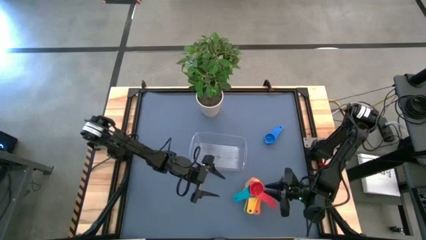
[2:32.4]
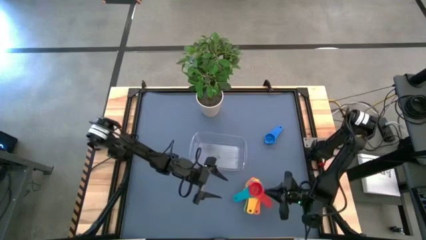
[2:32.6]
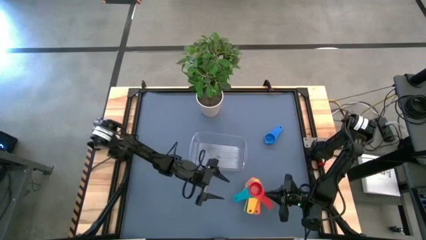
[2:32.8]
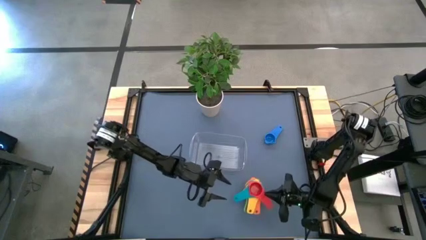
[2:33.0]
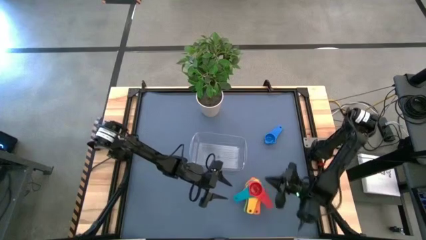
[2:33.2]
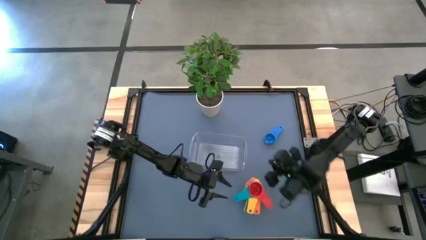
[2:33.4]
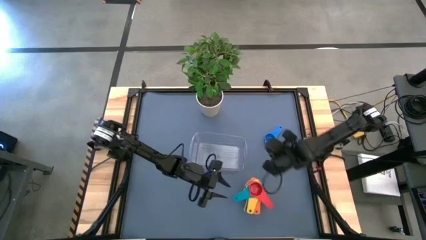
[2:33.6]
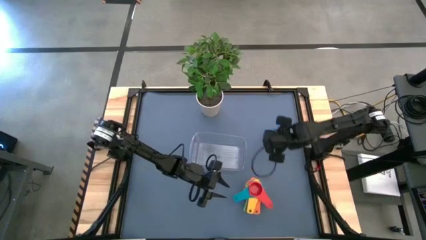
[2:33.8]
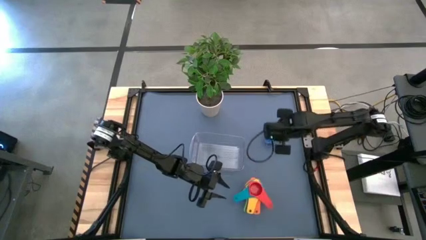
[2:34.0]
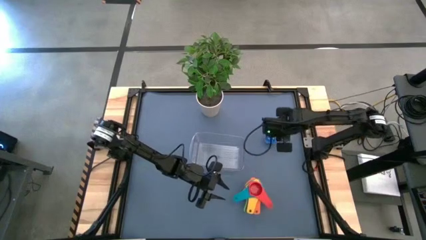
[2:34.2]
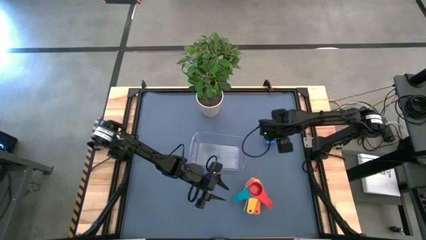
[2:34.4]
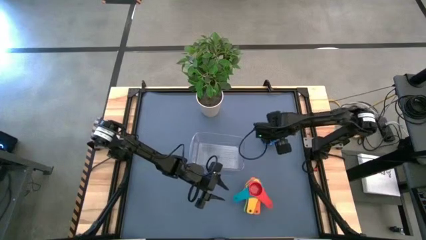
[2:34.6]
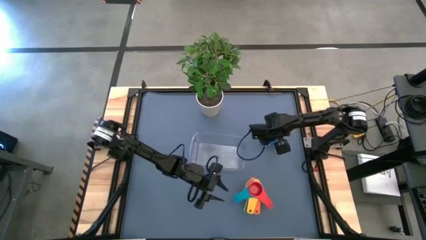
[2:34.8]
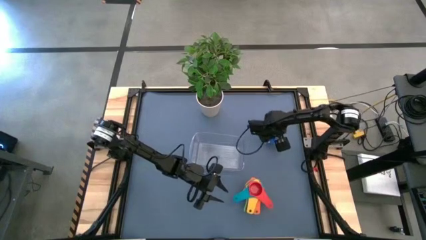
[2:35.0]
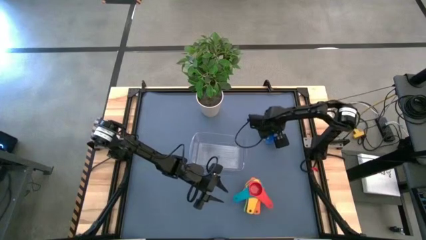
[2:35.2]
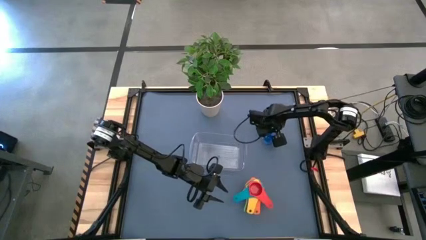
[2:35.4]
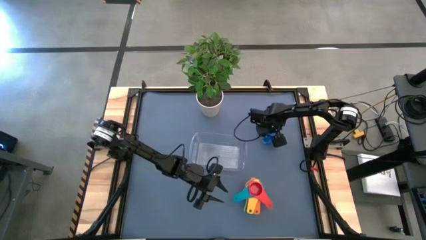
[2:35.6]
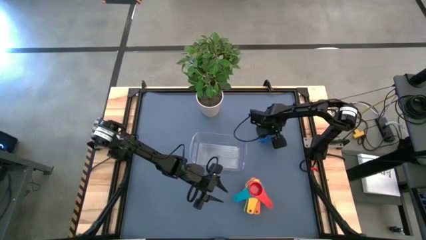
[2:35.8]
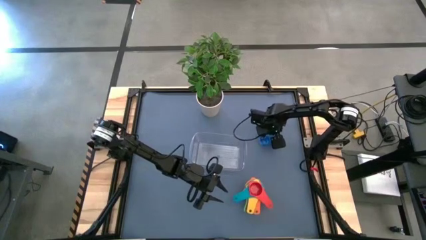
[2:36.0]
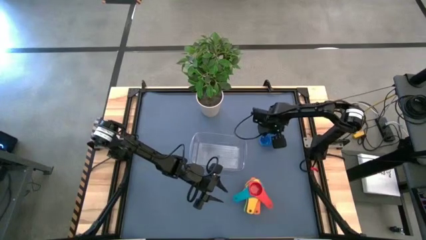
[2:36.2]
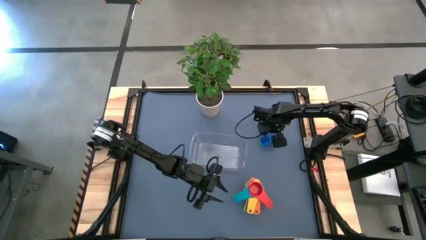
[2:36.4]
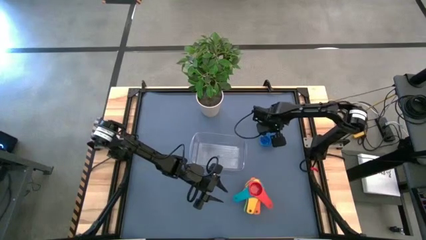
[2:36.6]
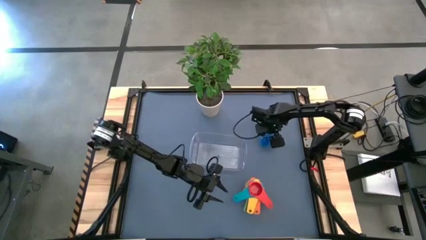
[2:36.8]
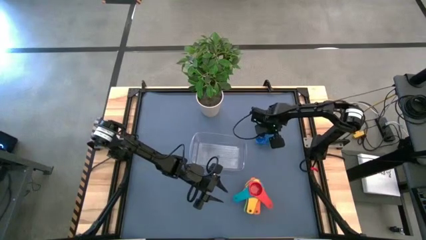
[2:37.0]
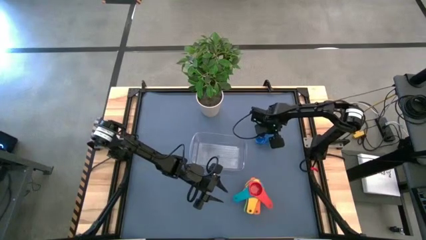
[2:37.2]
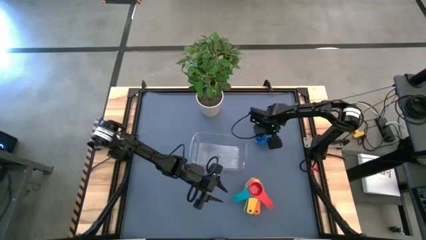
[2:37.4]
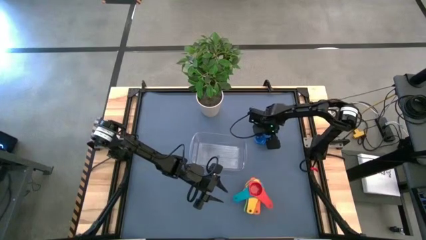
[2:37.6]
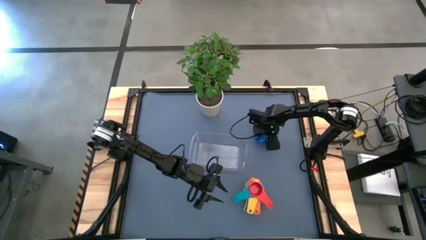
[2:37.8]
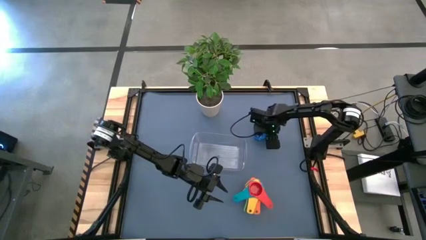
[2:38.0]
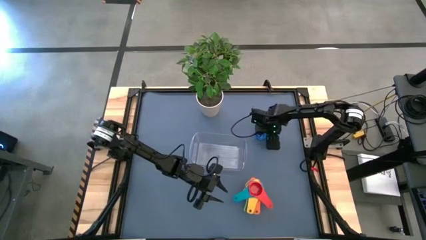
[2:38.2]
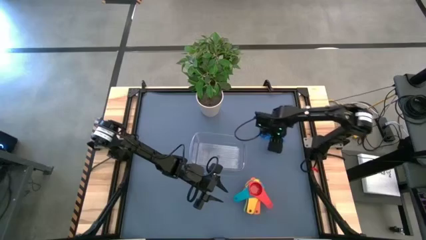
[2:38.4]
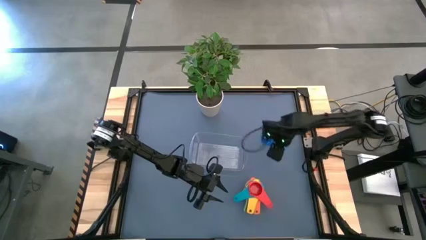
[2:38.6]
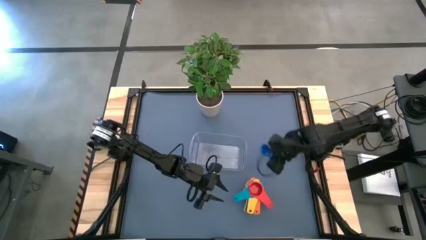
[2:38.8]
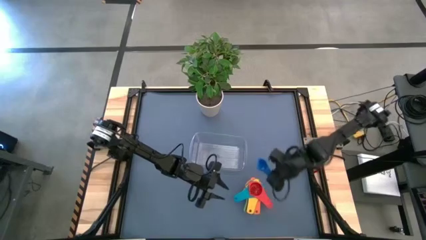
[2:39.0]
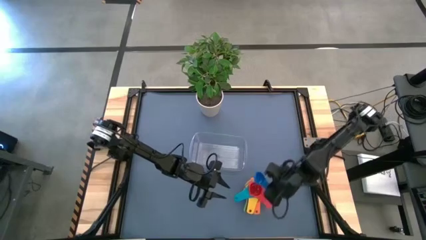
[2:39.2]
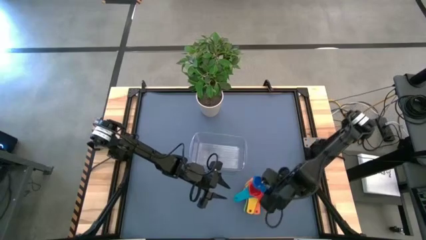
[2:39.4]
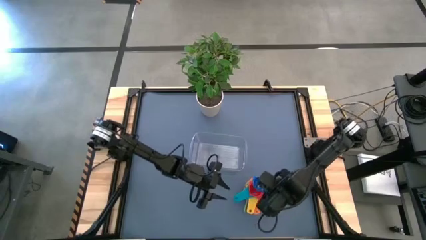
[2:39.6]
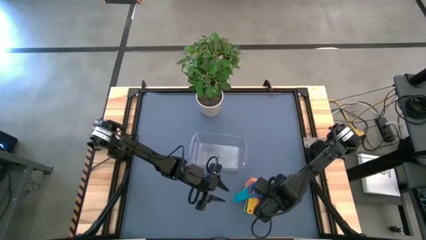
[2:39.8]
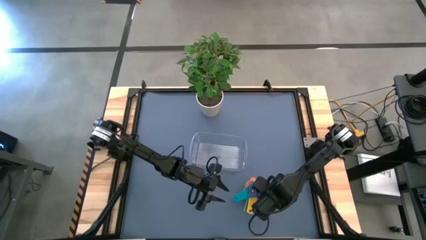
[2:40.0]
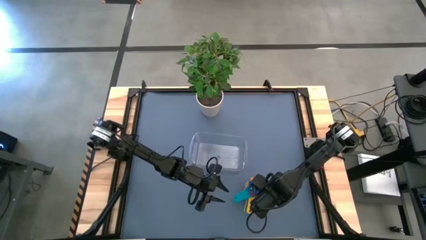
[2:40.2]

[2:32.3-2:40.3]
Task: Nest measuring cups in basket
Stack the blue measuring cup on top of the red measuring cup

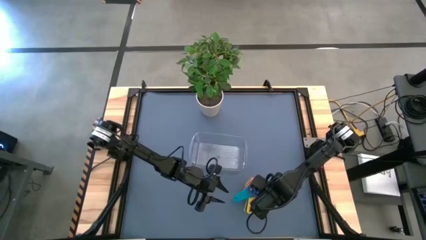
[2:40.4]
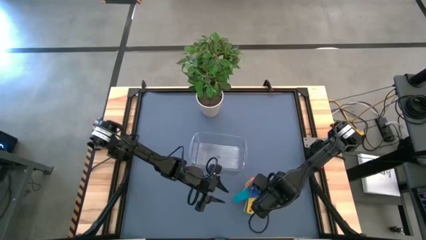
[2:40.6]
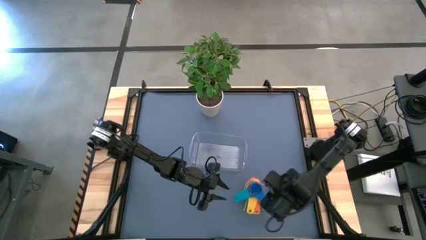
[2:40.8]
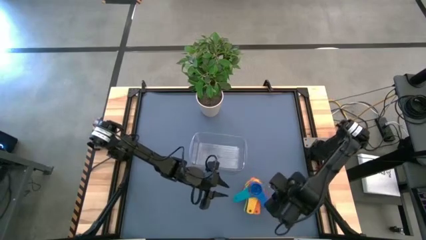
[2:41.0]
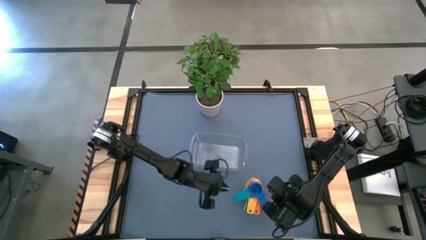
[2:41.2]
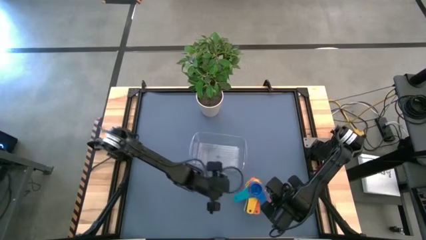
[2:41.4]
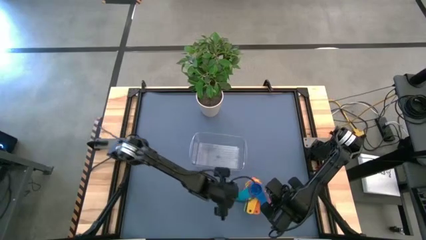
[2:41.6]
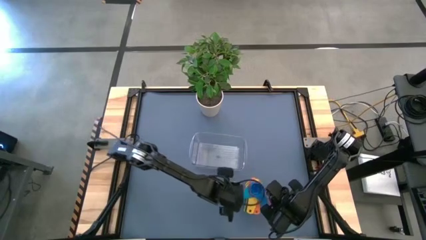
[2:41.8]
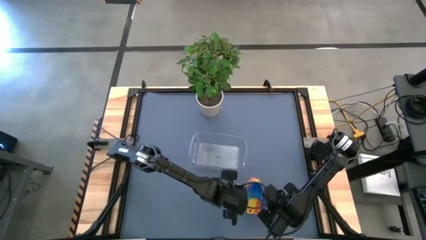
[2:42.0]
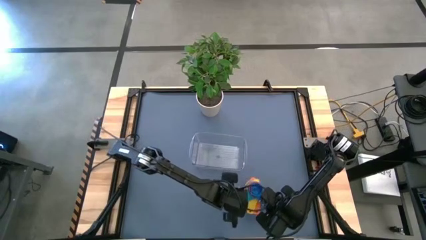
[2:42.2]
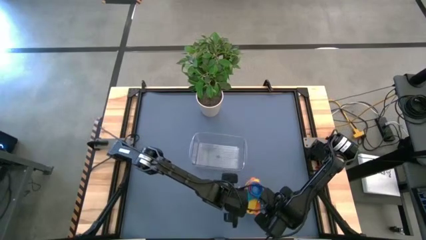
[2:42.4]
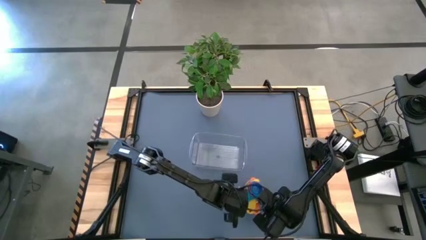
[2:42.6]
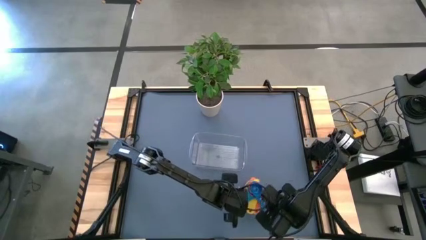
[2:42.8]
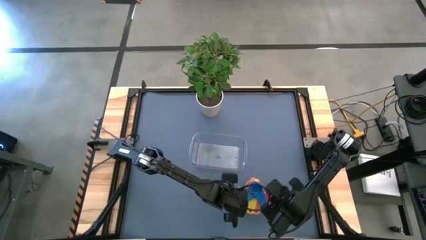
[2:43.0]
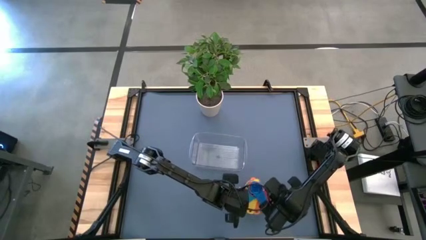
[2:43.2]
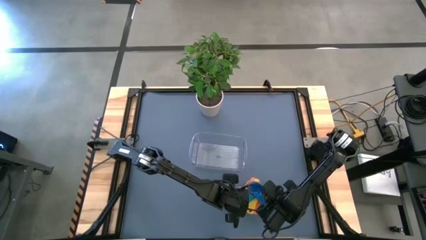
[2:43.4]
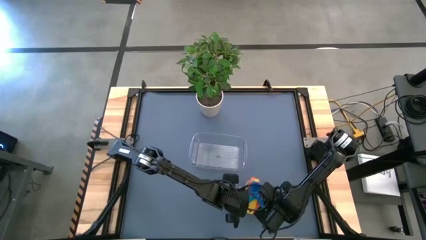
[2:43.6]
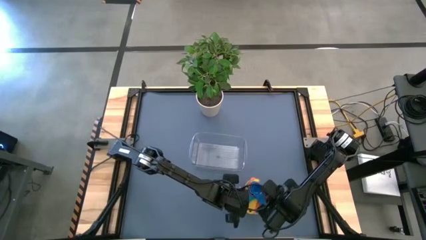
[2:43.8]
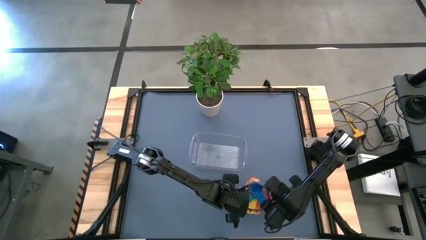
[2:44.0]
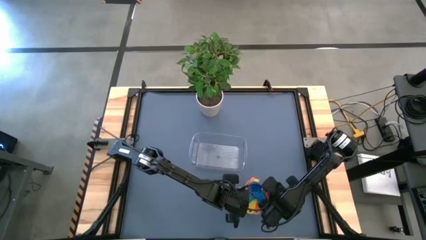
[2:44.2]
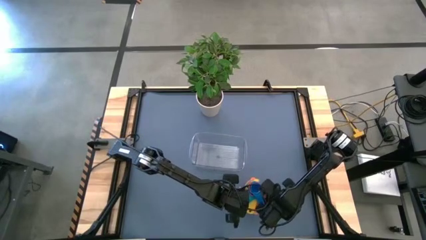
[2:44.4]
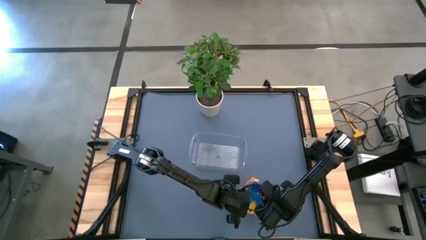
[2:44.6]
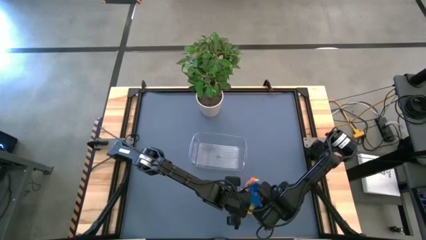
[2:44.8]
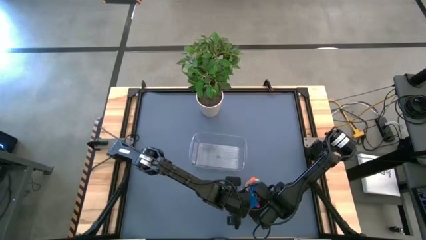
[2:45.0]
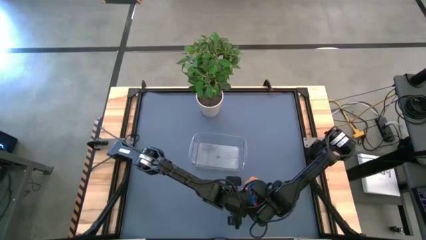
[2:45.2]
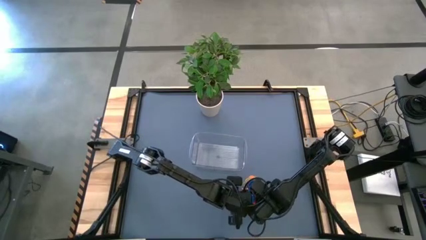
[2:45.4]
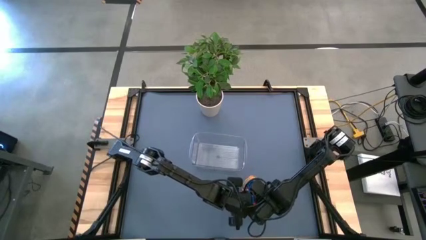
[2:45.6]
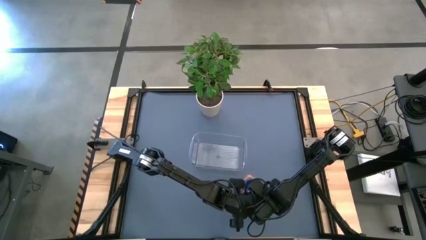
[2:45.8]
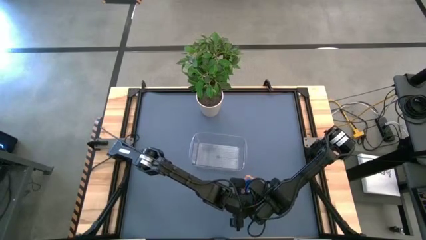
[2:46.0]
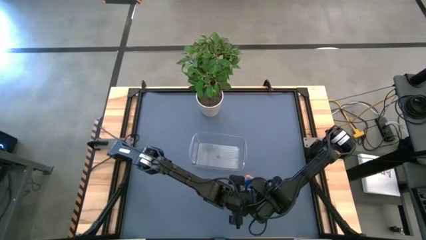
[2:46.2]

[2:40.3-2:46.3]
Adjust the stacked measuring cups

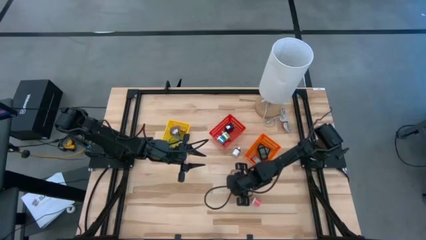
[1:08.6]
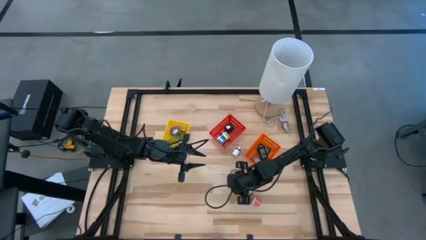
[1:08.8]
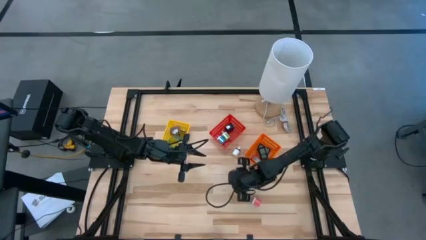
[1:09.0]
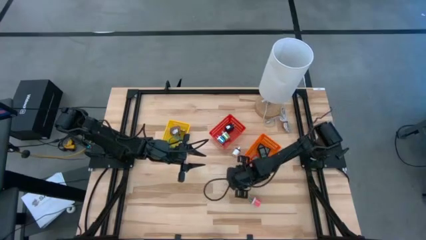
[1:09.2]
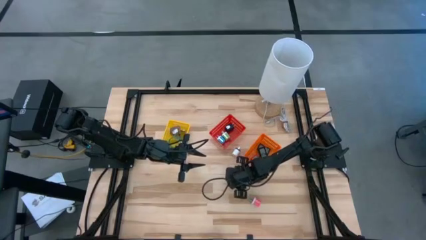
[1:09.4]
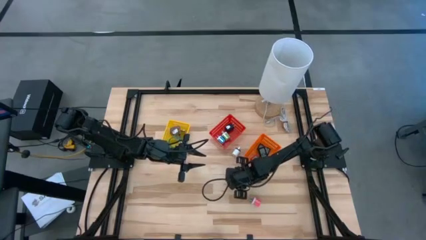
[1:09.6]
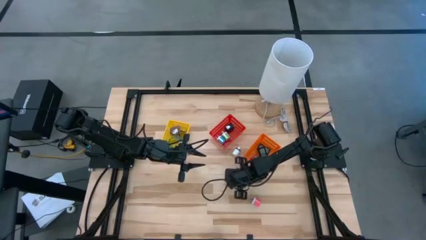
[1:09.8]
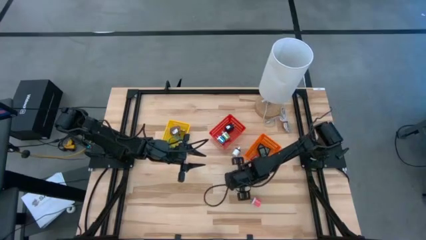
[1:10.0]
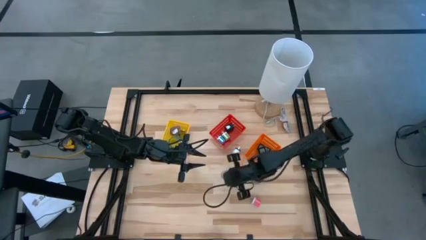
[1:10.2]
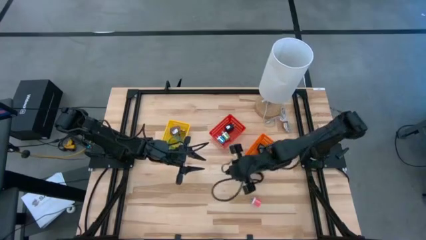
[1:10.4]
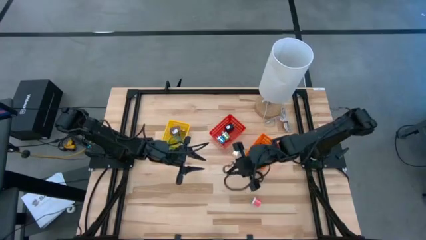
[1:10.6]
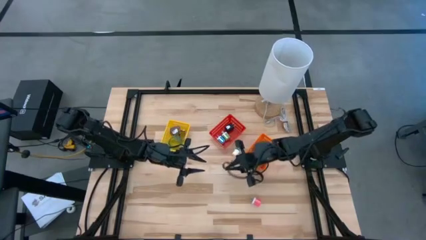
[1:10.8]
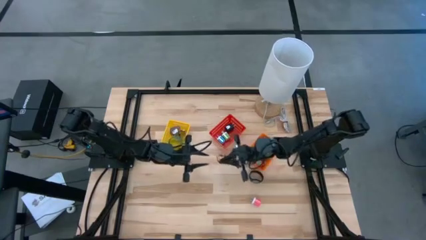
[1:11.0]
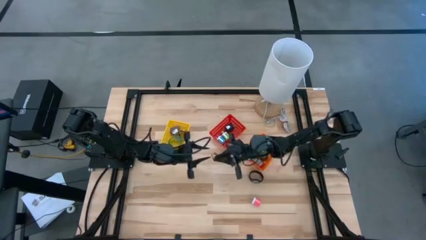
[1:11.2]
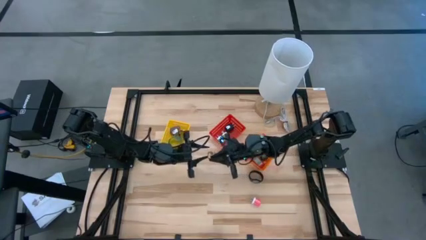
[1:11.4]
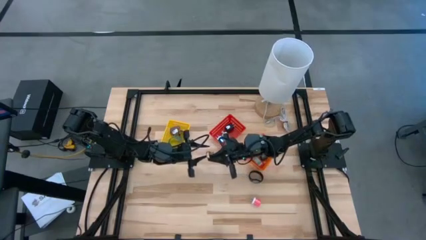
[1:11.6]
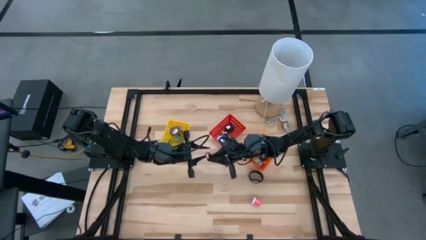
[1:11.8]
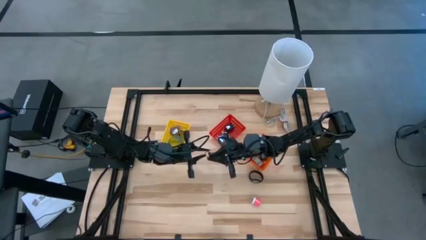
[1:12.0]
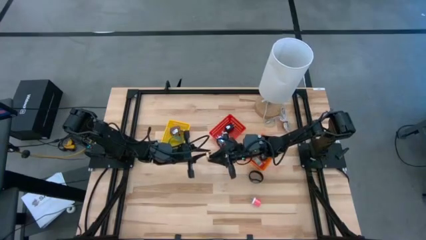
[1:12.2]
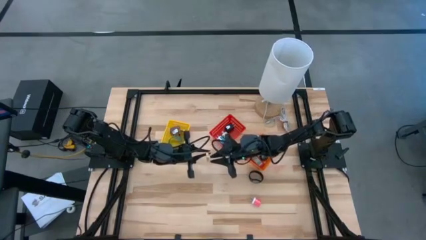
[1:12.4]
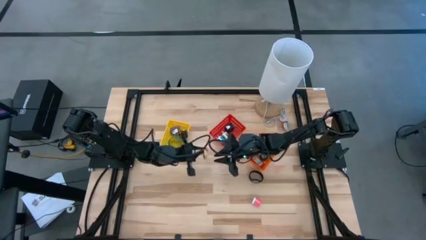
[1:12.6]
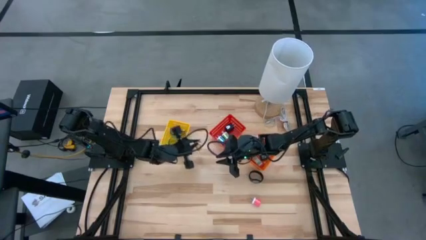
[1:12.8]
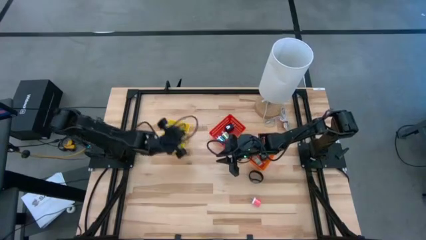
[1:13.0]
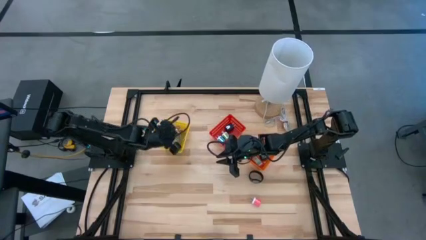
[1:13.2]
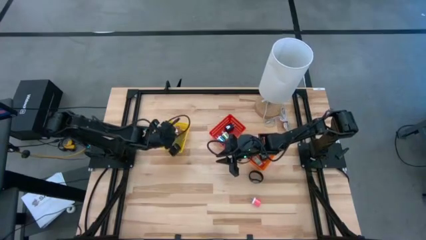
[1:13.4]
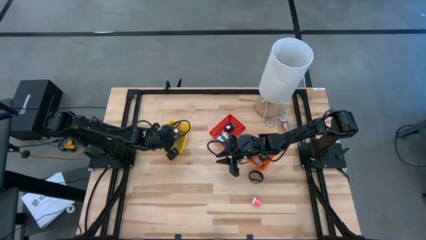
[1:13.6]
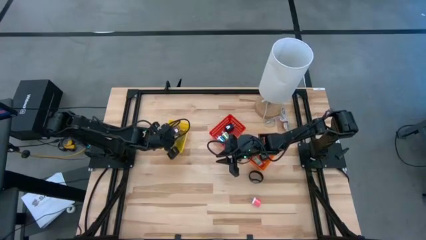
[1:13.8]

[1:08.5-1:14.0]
Task: Pick & Place Office items
Put the gold watch into the yellow bin
